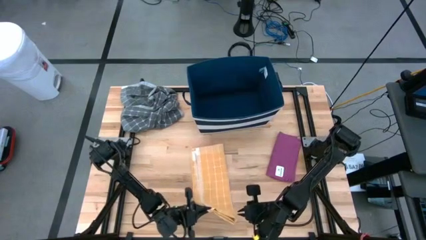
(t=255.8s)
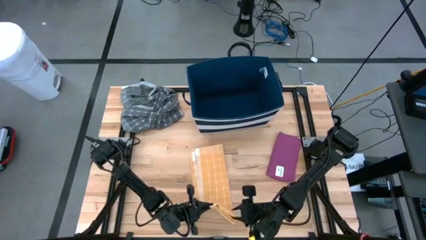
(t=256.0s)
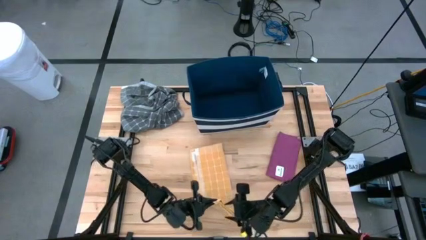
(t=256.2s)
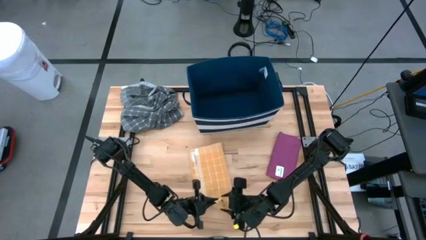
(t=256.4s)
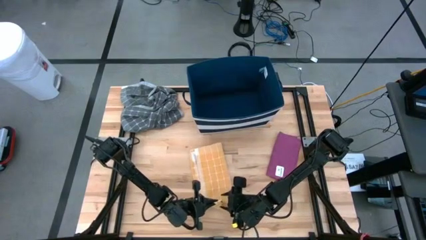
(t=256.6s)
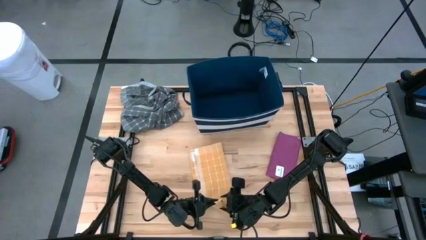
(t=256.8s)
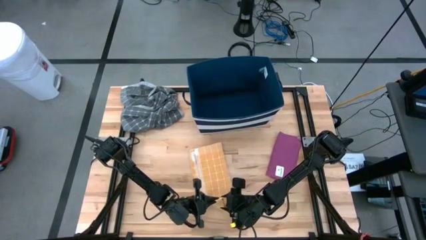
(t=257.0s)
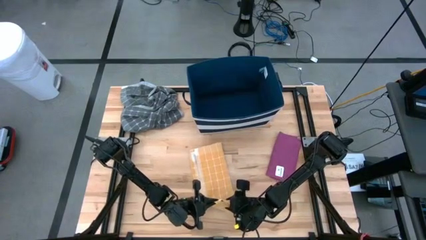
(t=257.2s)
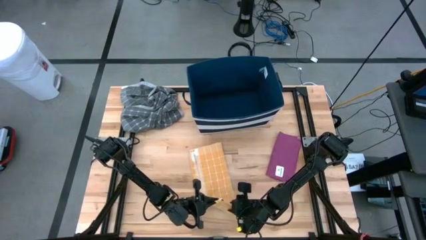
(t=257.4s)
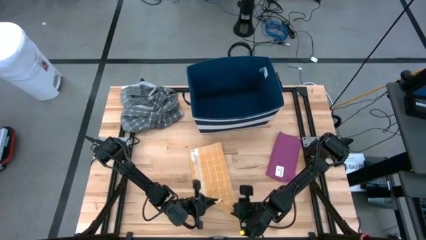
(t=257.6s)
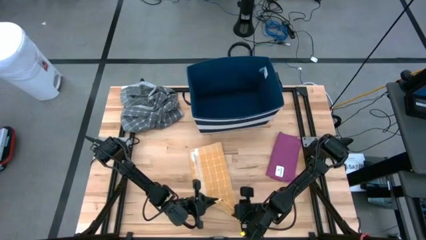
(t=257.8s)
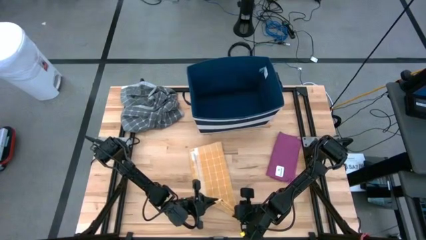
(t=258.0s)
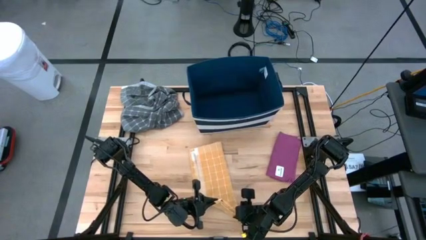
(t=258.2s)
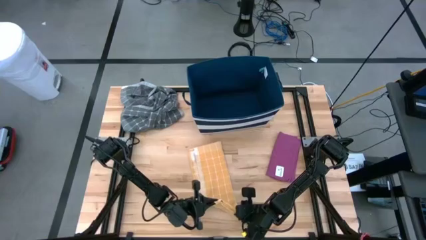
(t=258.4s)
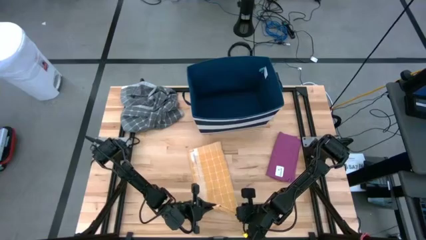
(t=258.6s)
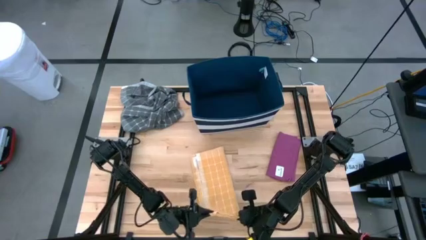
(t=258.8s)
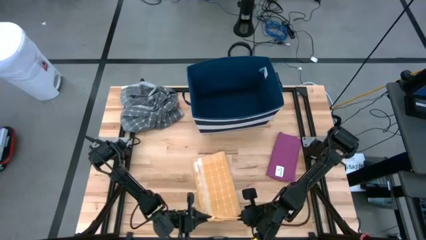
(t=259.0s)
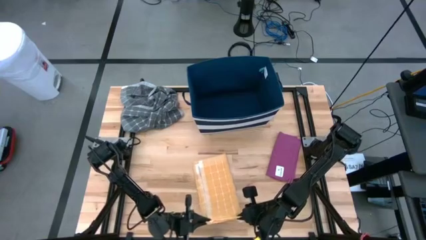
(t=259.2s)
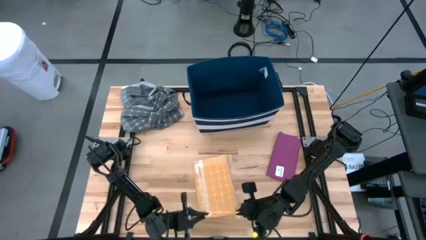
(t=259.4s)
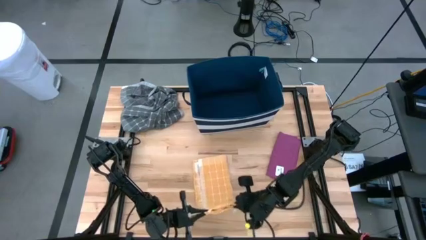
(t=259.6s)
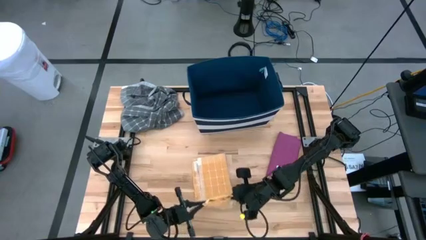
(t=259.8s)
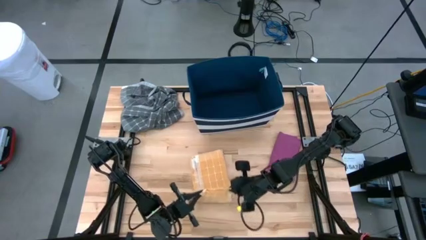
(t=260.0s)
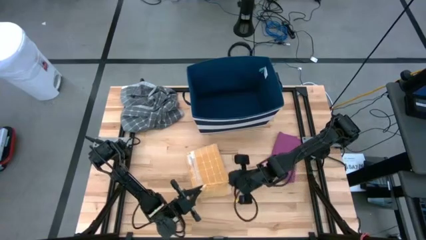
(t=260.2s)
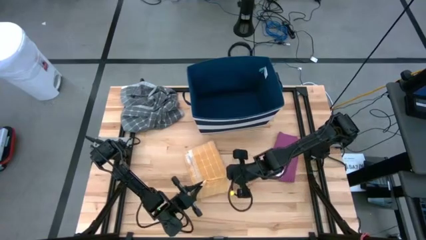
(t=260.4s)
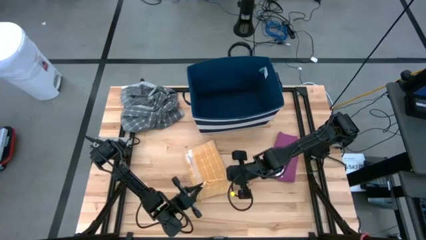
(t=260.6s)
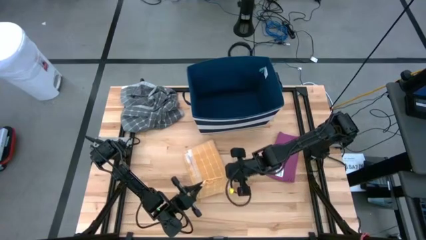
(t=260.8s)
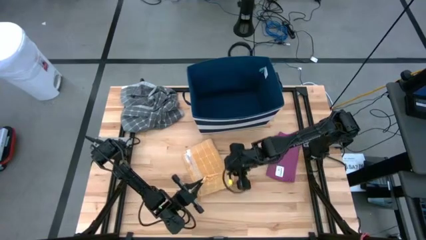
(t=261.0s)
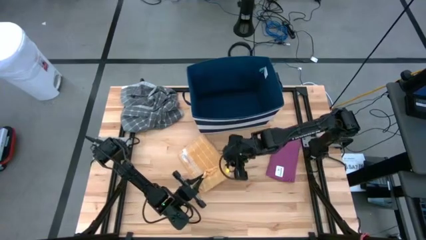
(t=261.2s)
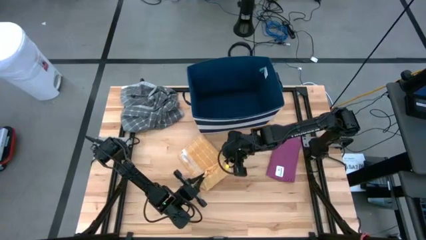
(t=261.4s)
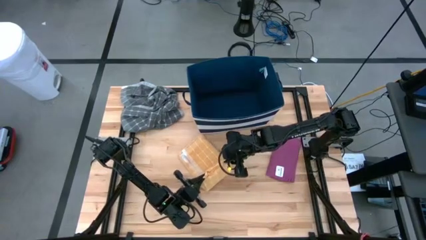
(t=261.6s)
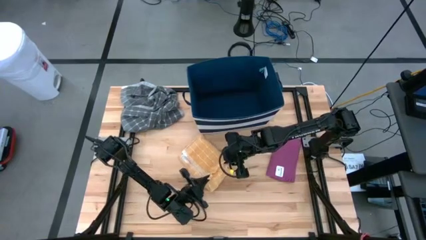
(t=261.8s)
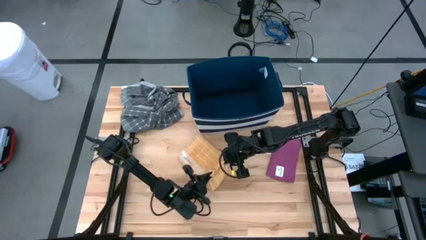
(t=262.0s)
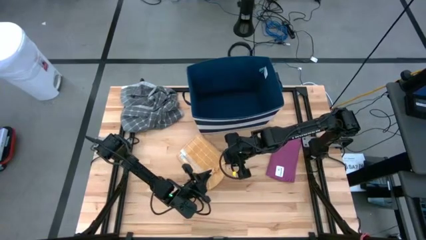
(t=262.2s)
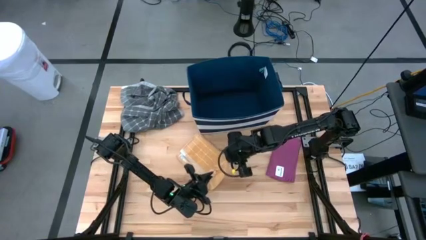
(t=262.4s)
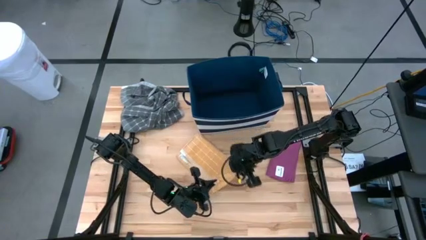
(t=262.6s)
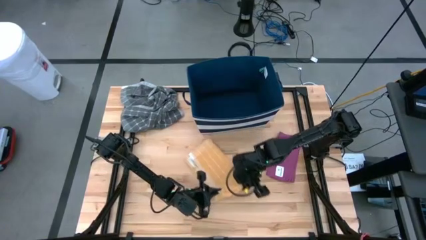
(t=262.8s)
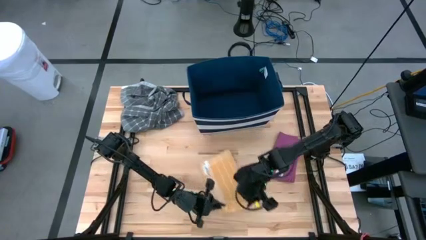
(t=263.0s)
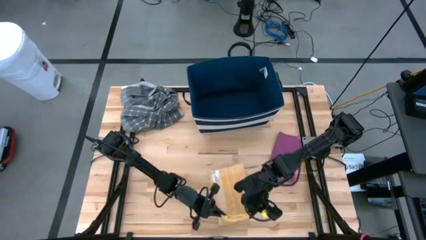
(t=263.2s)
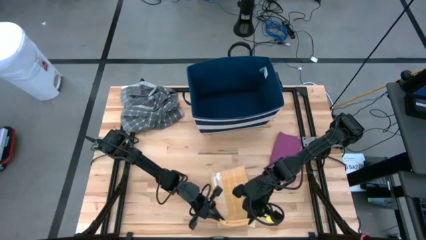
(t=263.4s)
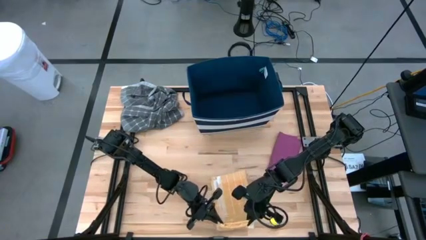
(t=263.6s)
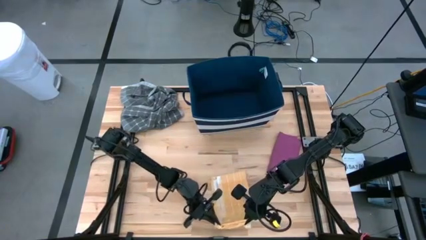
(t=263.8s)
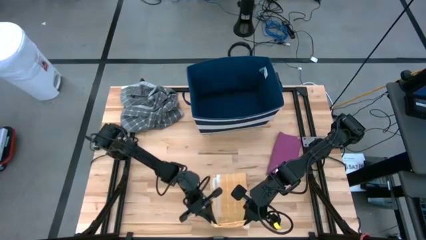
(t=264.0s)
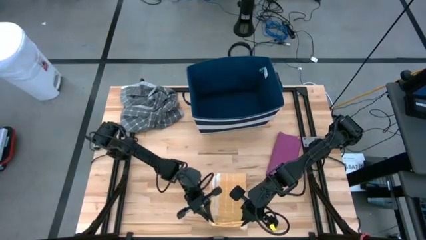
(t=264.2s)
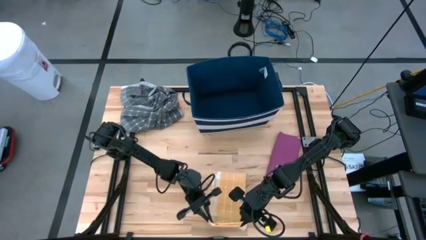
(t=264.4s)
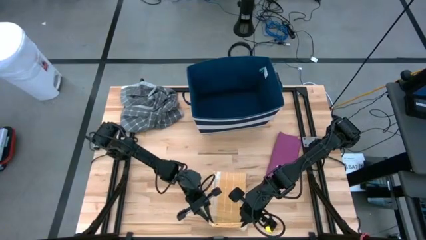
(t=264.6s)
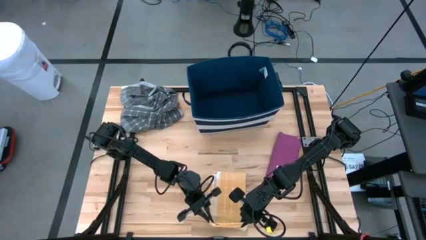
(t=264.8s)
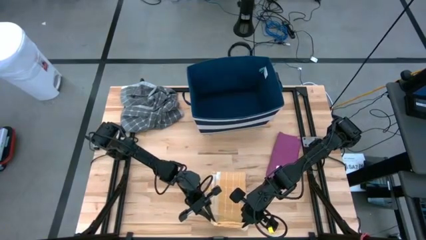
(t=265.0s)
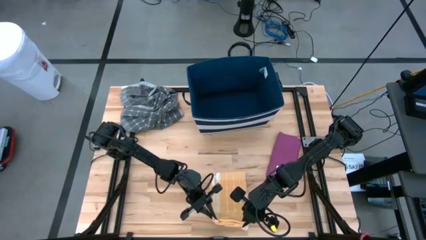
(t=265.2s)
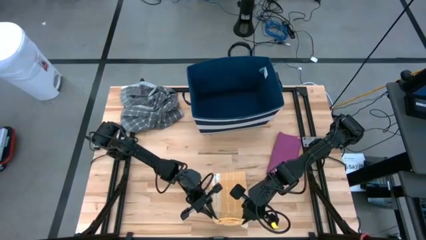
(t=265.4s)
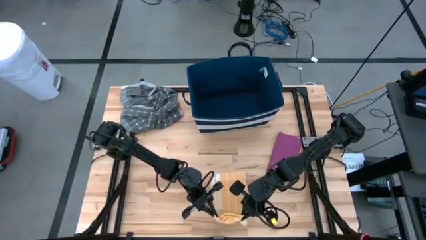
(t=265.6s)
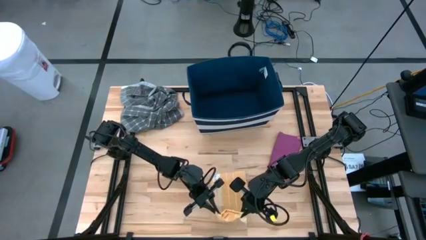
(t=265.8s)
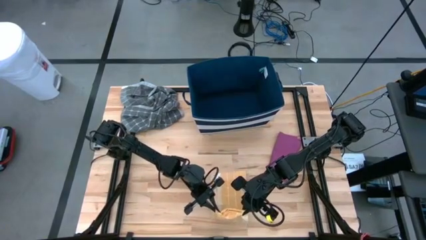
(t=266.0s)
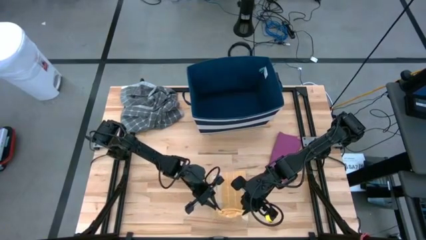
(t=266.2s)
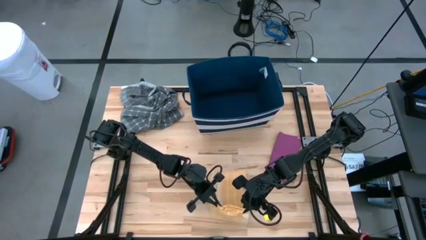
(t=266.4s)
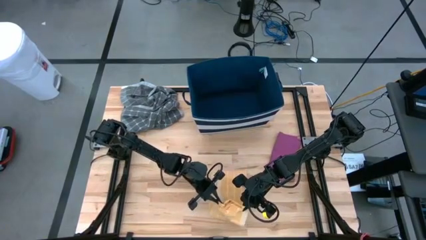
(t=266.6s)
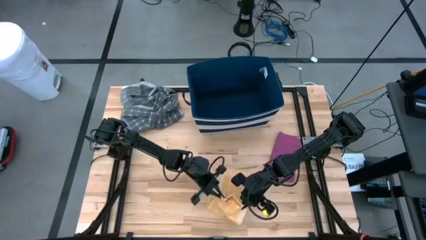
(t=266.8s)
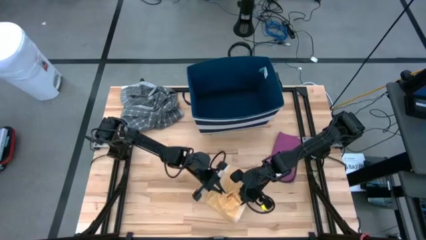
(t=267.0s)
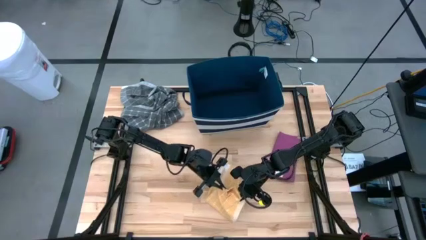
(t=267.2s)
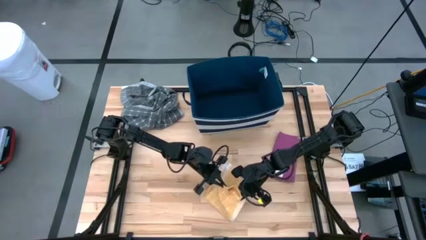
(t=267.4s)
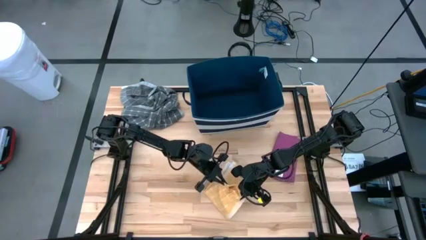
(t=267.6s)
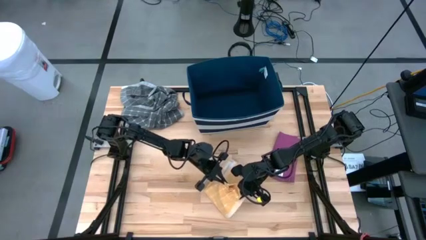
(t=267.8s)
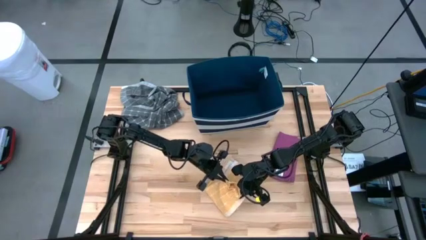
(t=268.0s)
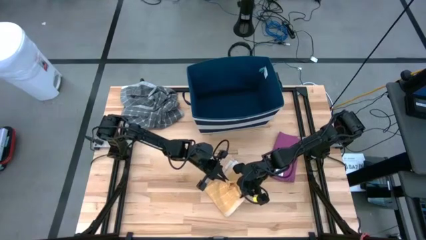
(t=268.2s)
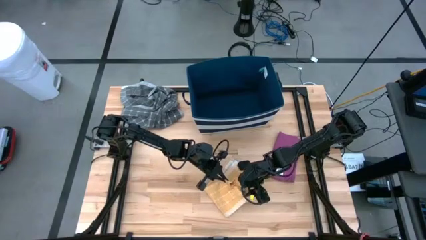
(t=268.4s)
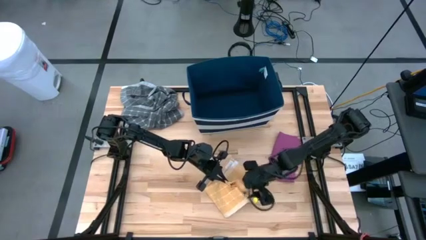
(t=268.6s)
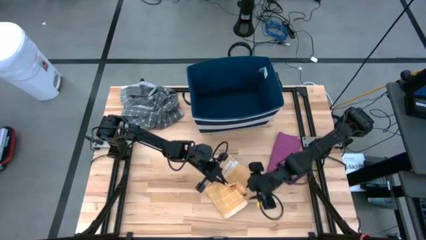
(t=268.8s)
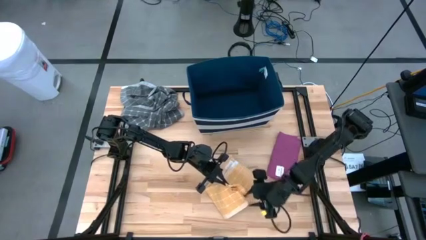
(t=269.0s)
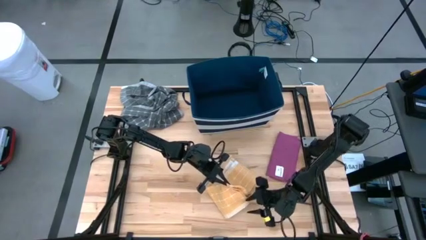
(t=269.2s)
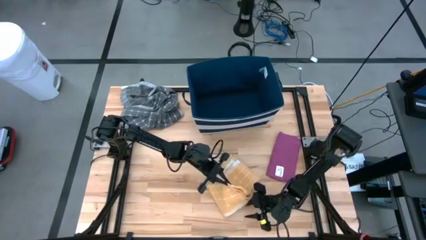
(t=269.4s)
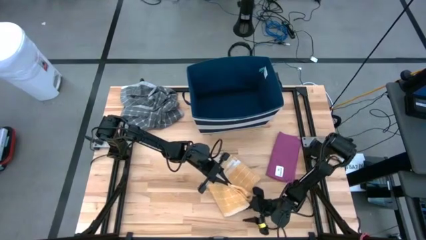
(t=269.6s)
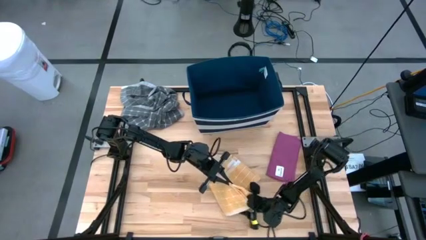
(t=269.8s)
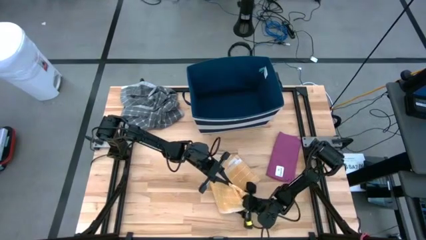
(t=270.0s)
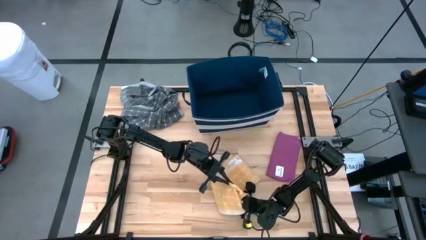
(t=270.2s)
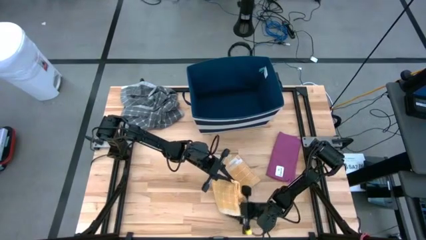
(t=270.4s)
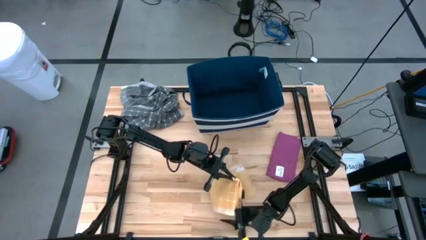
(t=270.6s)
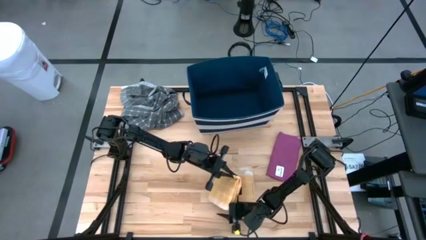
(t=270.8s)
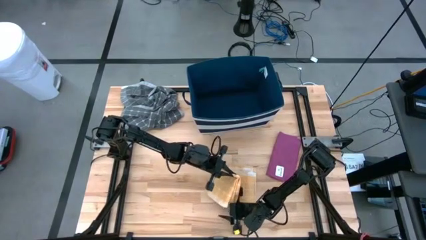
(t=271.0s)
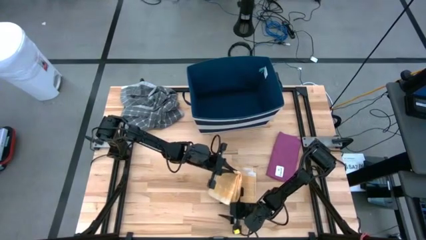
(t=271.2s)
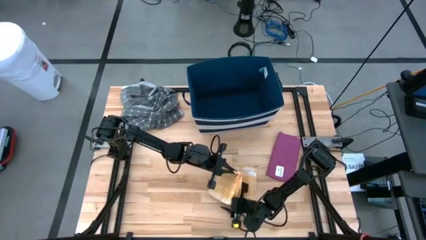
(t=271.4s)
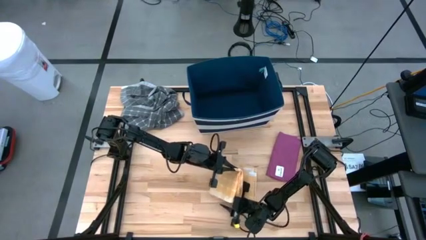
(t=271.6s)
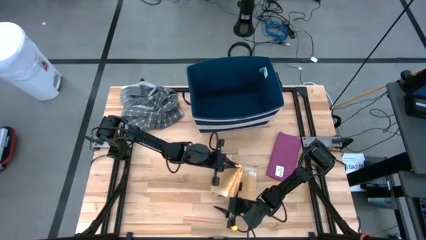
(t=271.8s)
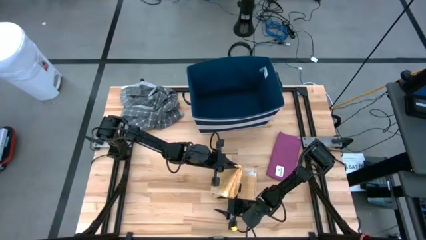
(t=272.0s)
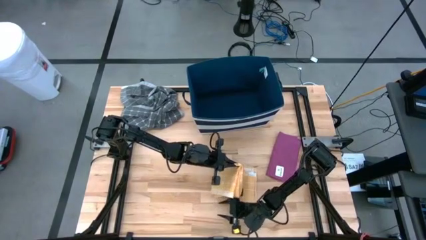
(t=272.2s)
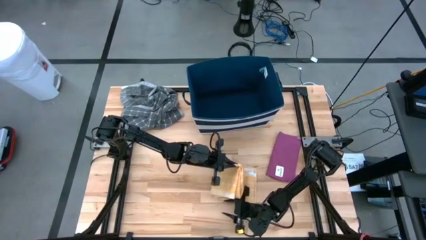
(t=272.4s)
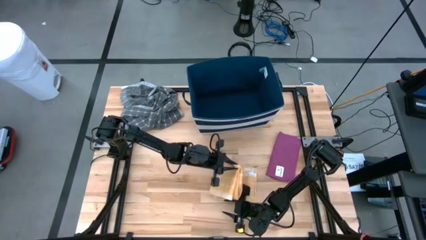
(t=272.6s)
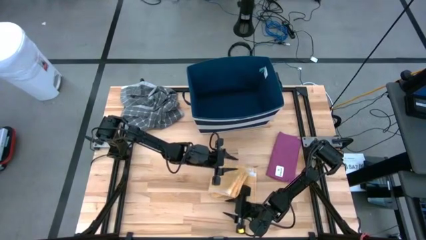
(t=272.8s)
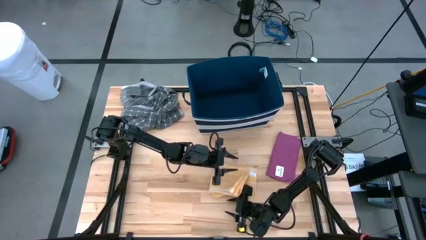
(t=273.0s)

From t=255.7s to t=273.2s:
Task: Fold towel
Fold the yellow towel
